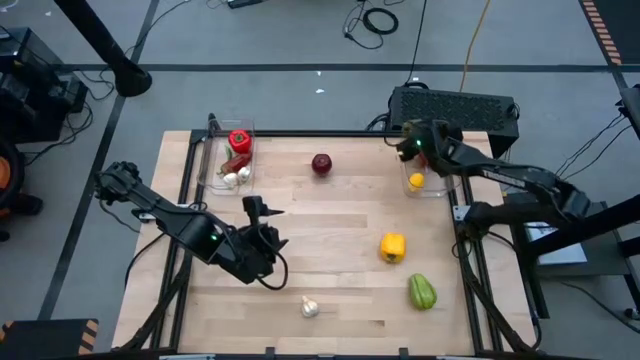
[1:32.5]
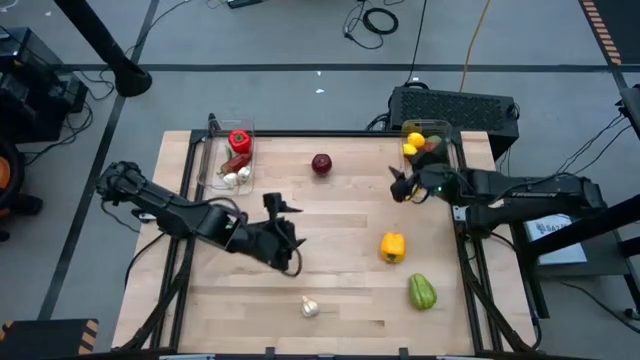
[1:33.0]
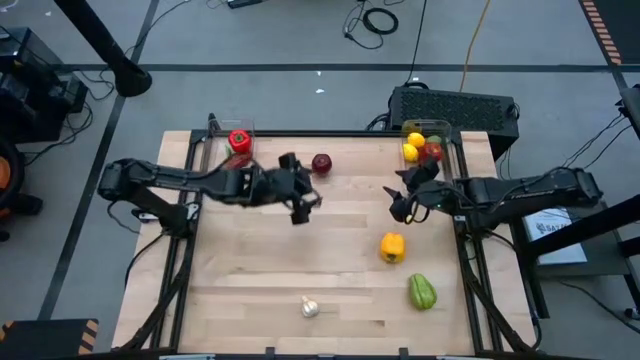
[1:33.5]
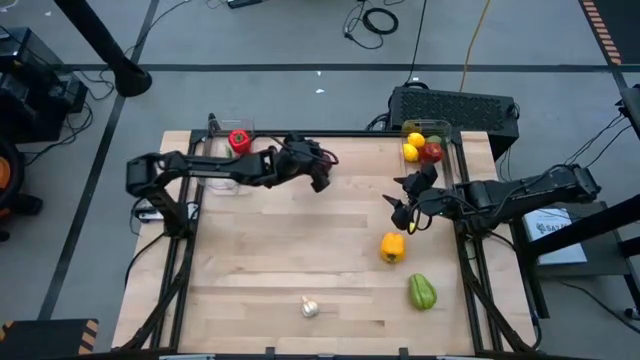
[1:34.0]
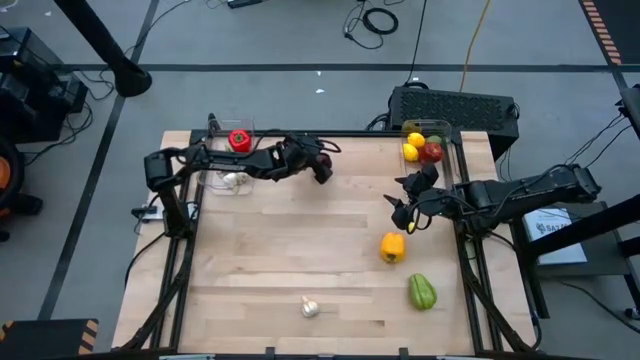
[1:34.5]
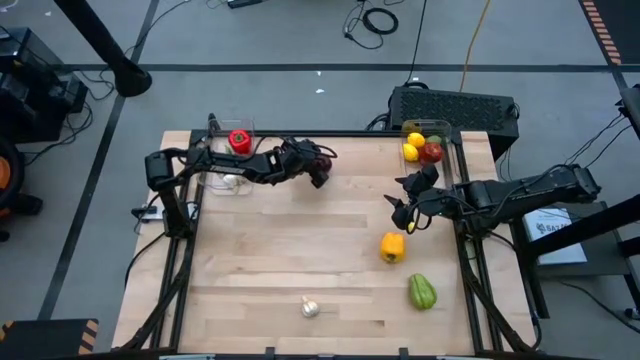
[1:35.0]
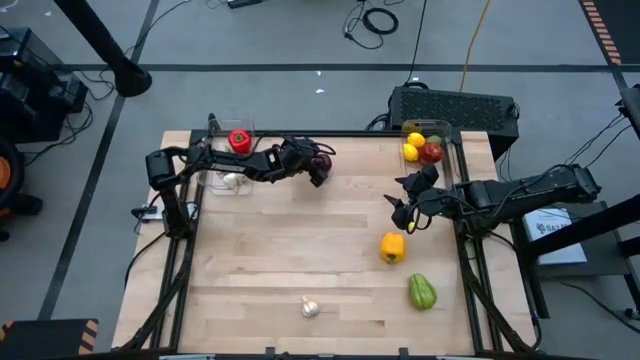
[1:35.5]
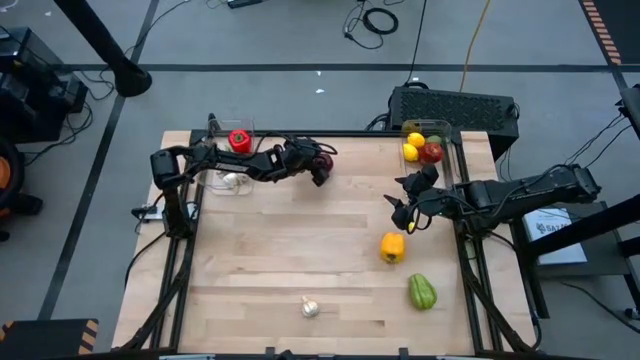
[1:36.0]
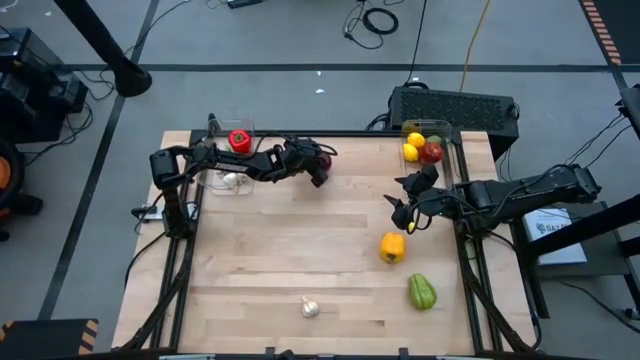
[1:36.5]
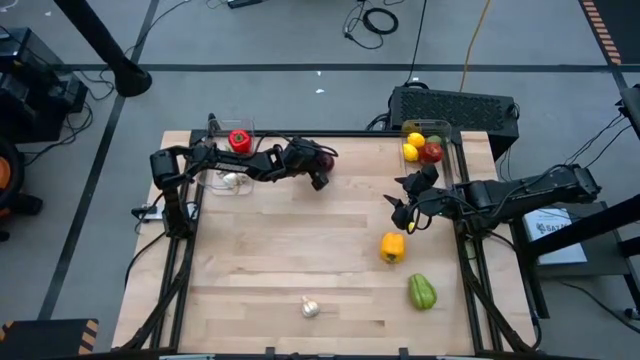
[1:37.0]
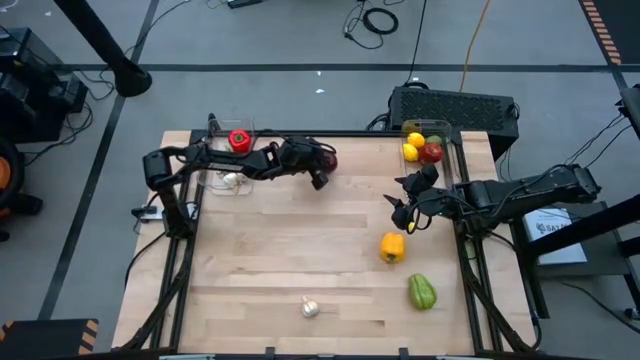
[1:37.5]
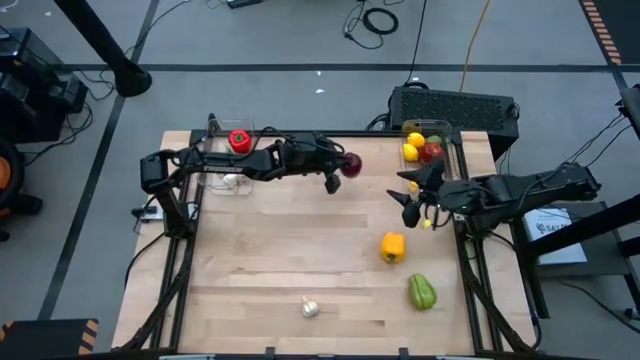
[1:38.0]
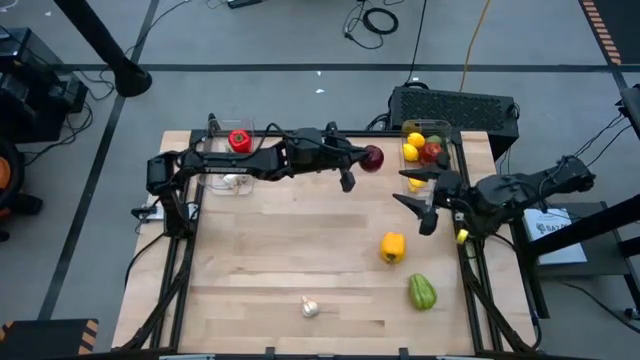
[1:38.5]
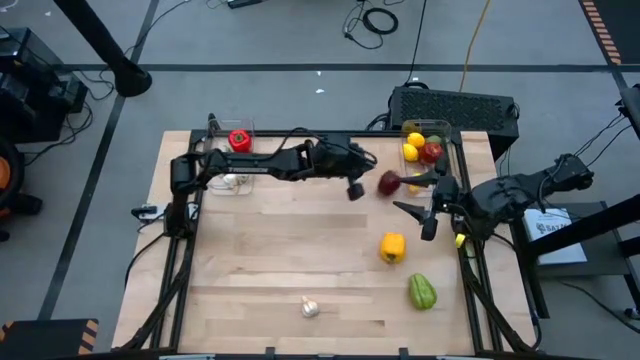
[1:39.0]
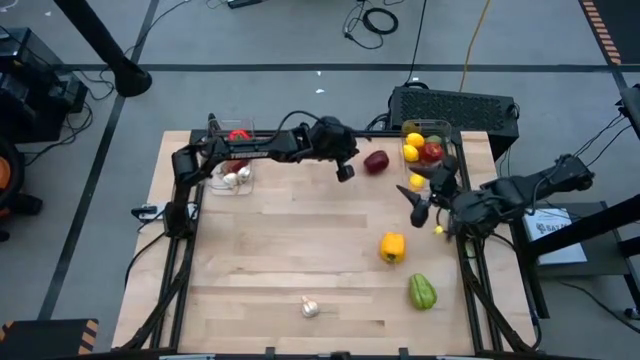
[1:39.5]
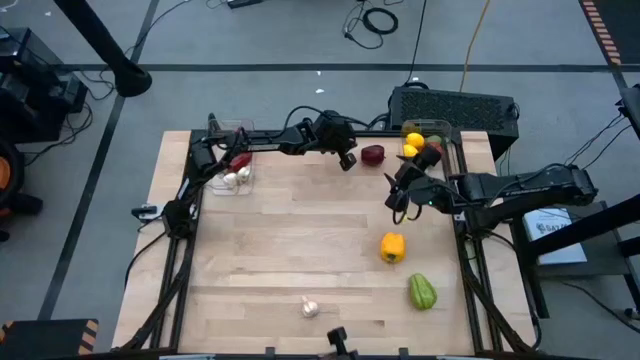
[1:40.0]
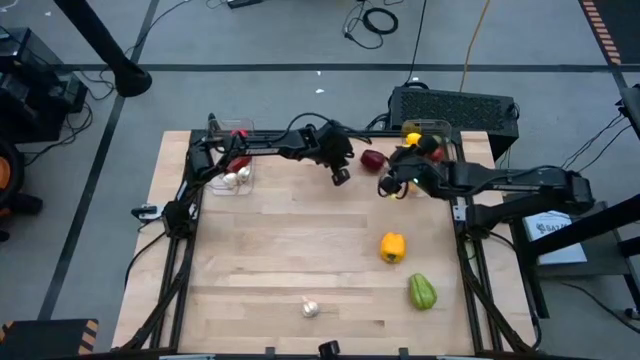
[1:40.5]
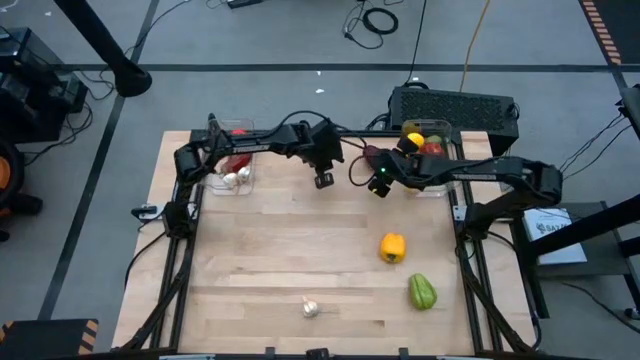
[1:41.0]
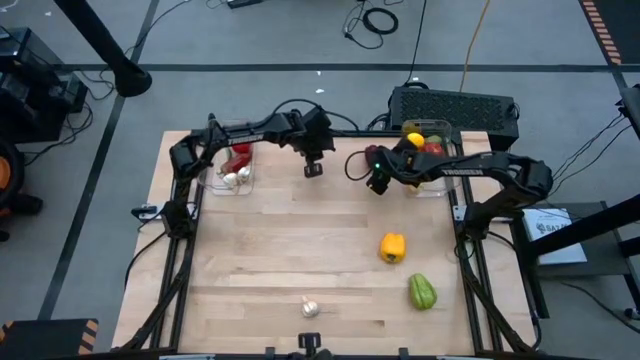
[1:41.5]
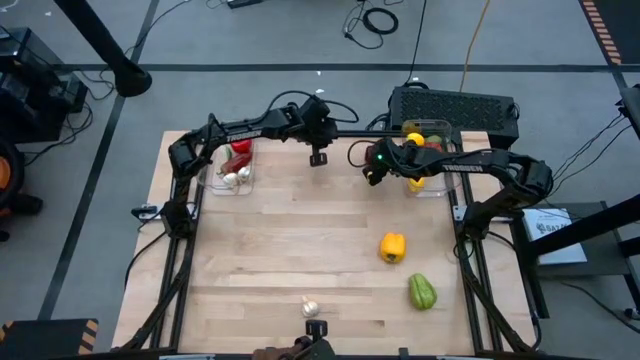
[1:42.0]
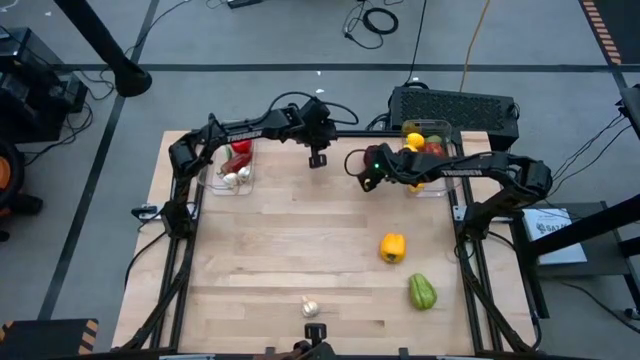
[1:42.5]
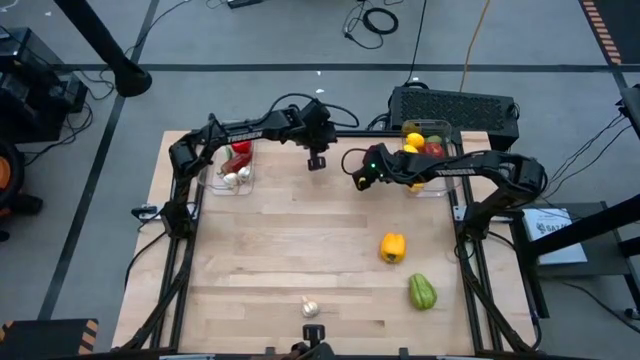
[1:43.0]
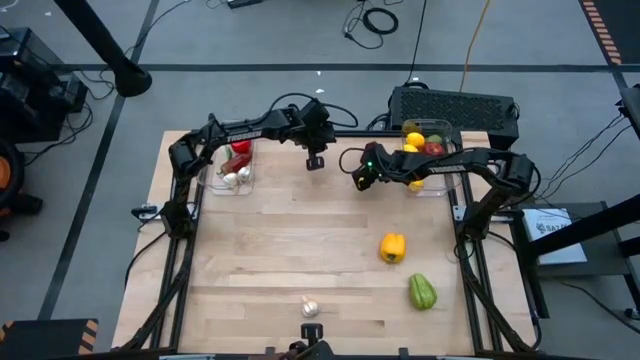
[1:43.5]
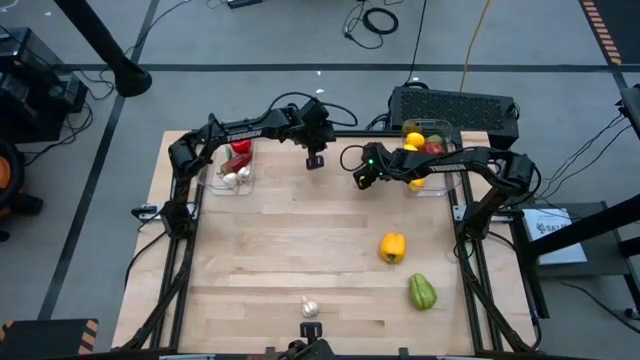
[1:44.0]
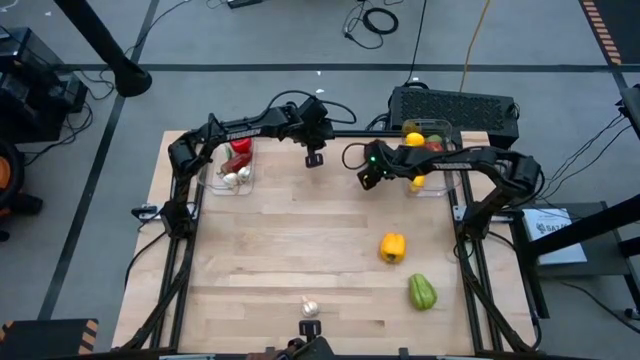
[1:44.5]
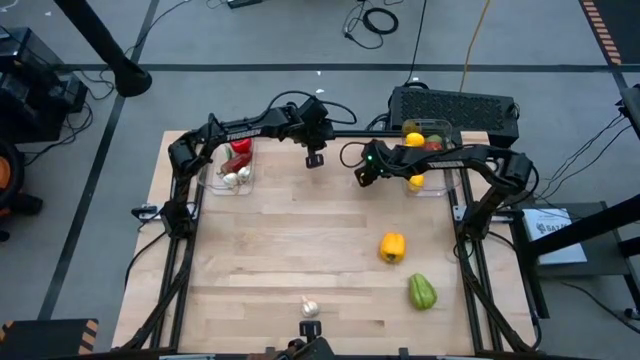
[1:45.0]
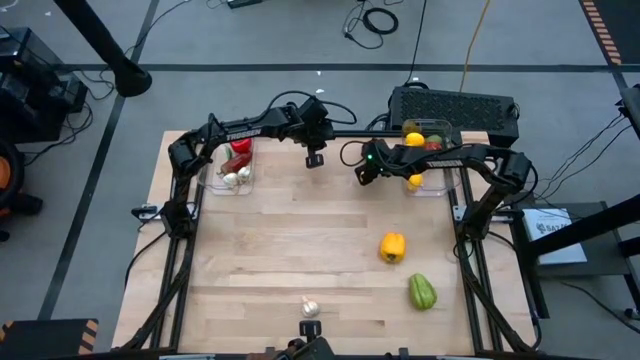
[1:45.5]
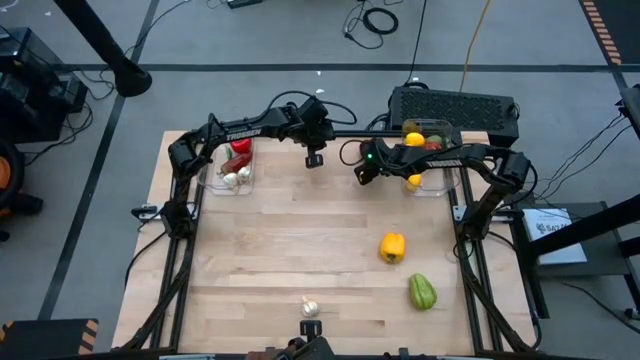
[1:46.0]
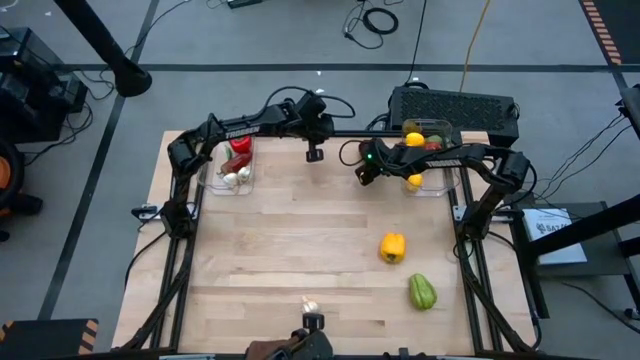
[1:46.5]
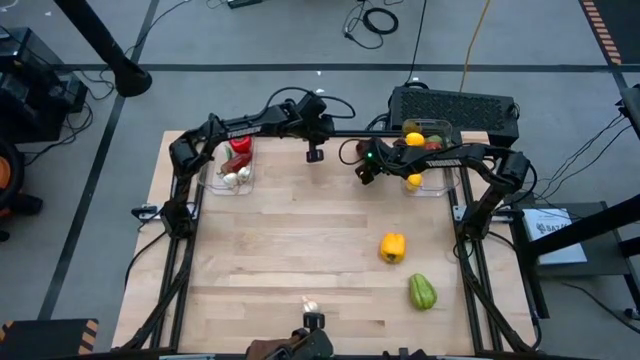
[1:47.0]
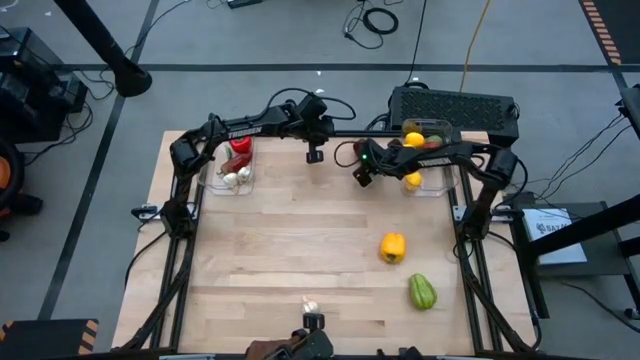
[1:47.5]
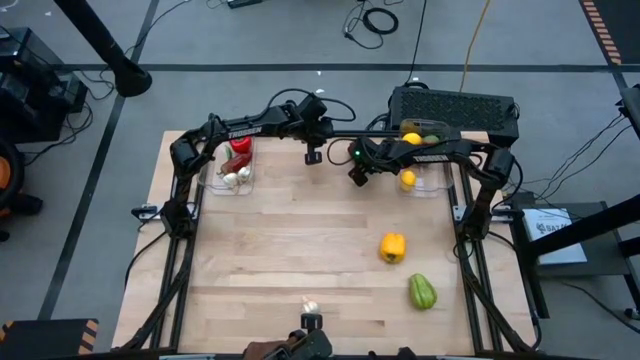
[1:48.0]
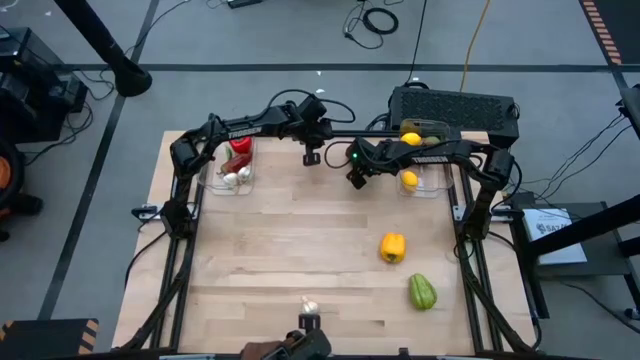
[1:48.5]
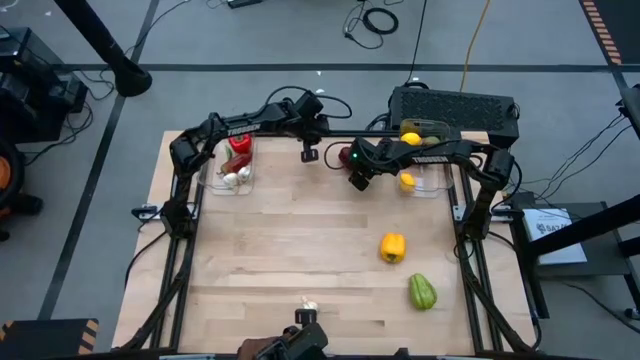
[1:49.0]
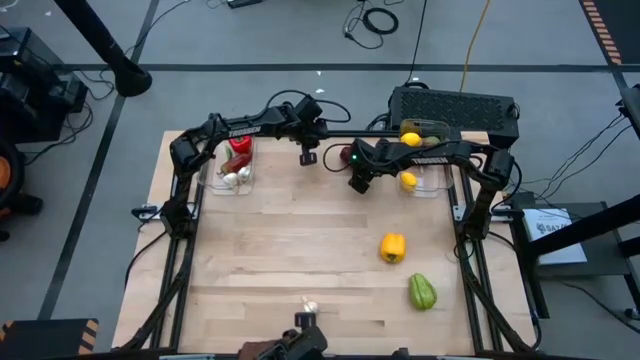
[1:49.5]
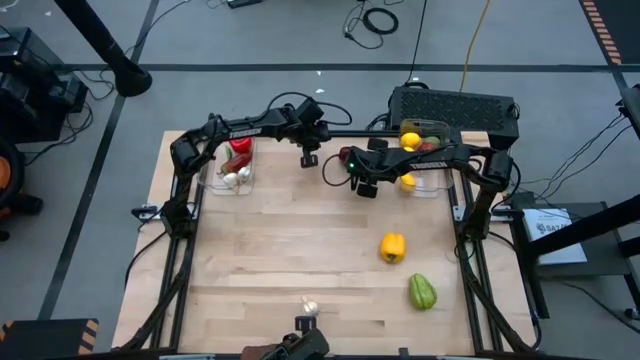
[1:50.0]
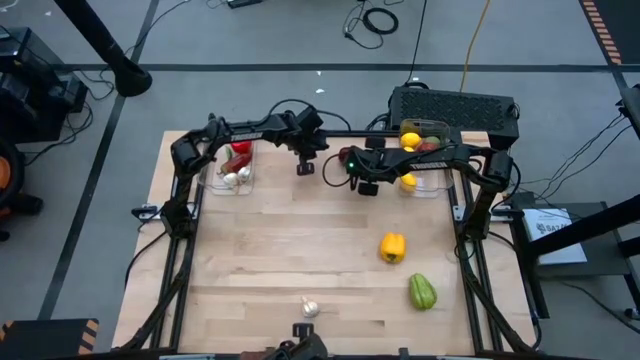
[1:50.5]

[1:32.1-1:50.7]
Task: Sort produce into baskets
Put the apple into the right transparent bin

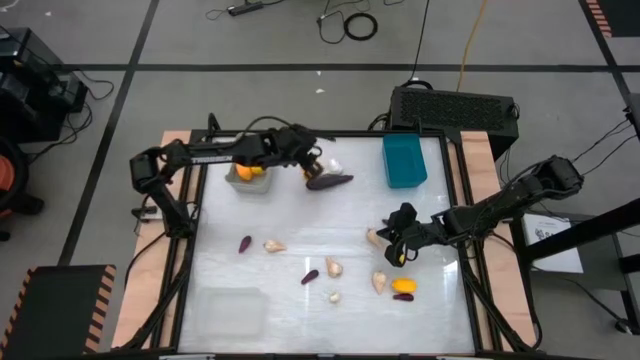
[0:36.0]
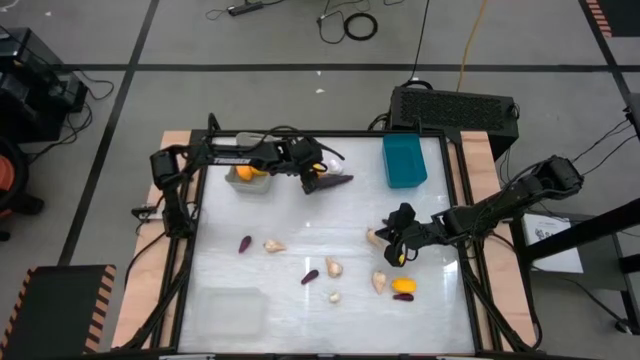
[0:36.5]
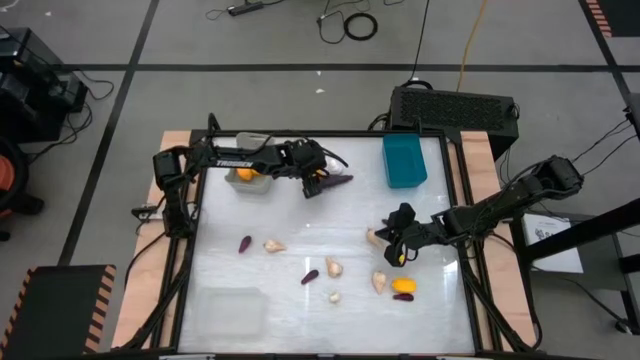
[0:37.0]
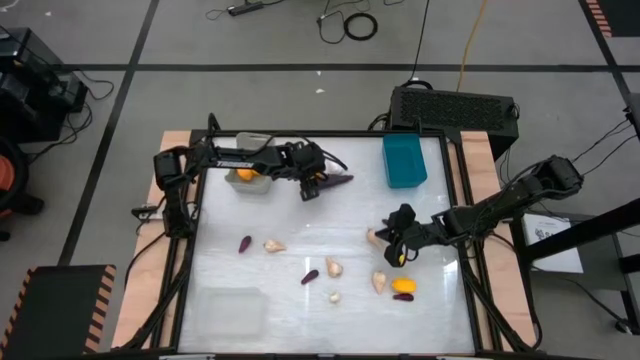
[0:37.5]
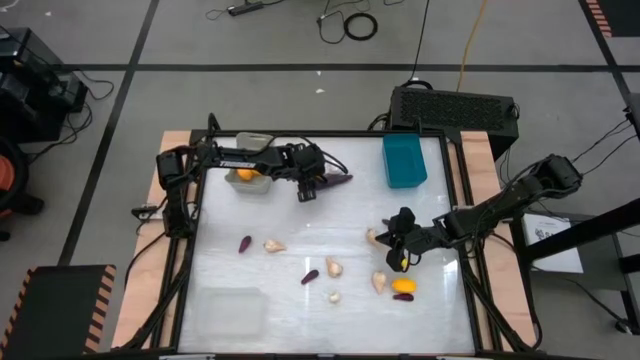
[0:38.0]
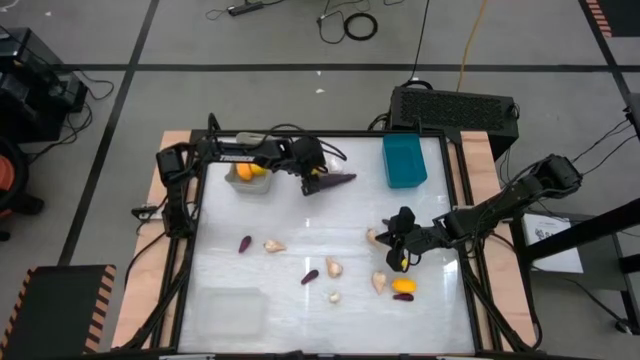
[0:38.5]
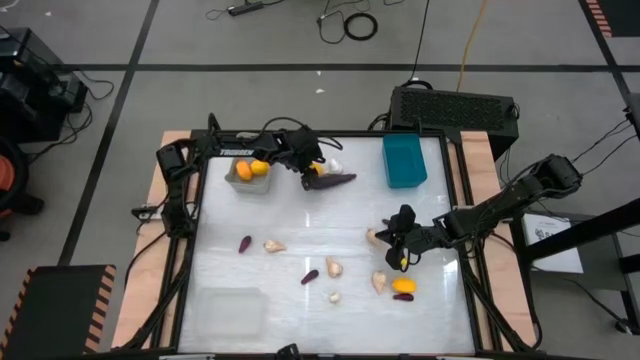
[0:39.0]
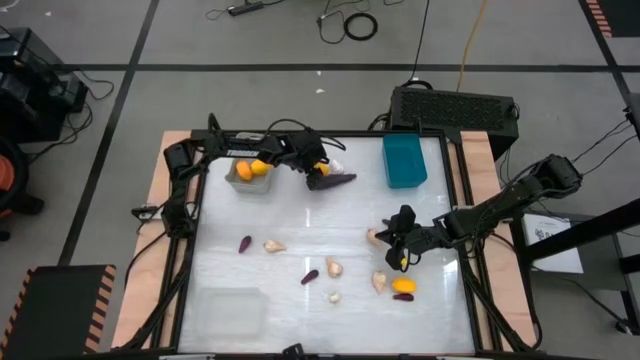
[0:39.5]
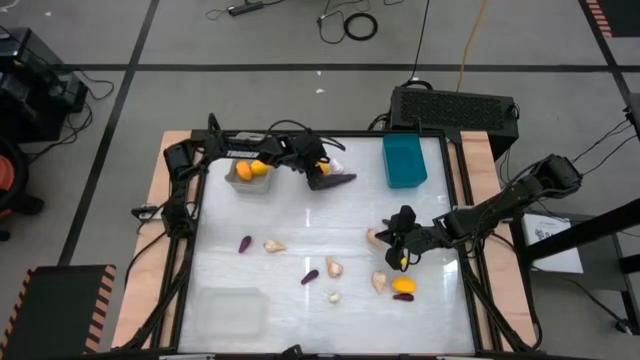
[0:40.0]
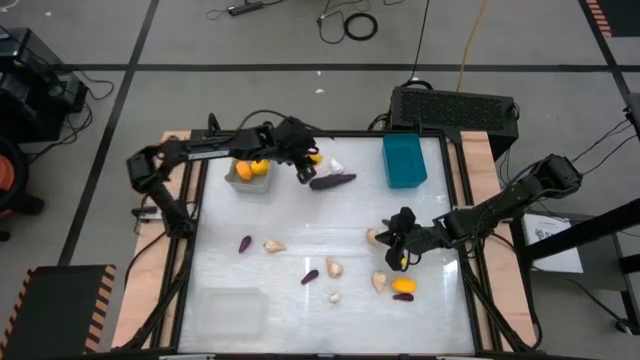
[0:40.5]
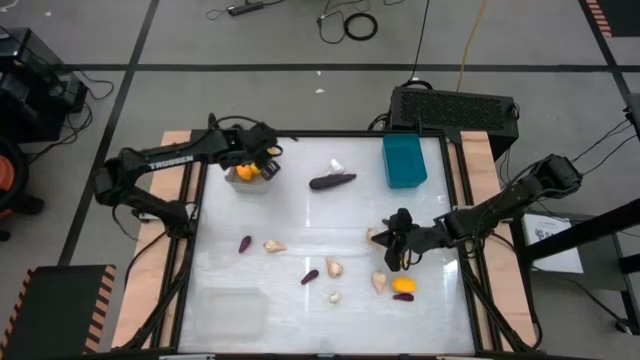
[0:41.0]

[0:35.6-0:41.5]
Task: Sort produce into baskets
Put the lemon into the gray bin
